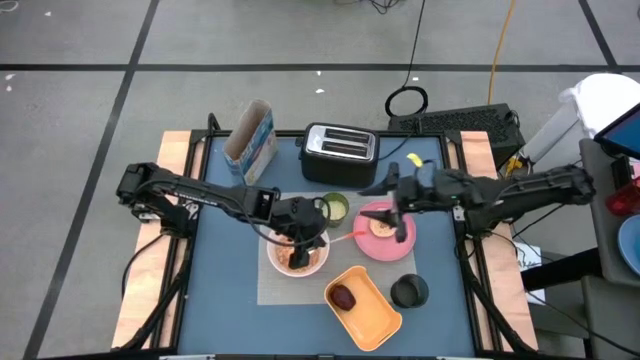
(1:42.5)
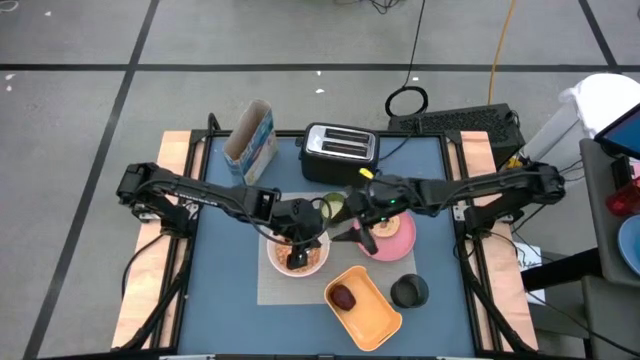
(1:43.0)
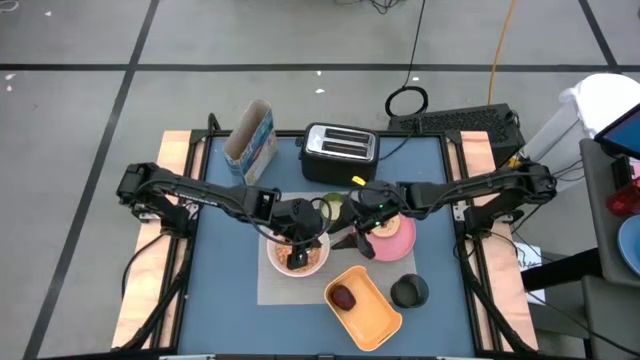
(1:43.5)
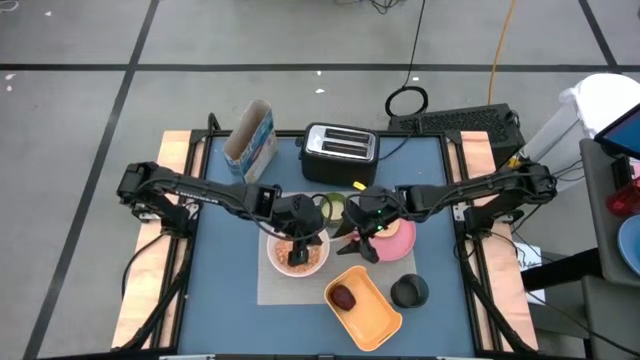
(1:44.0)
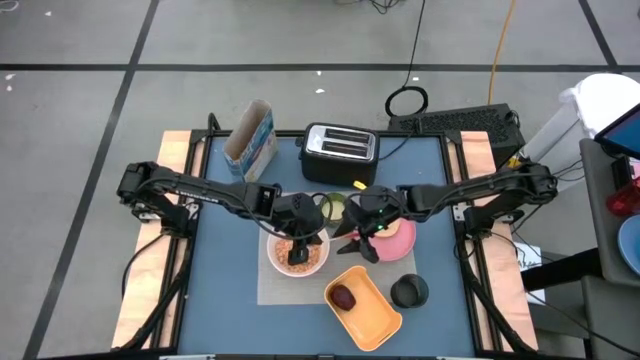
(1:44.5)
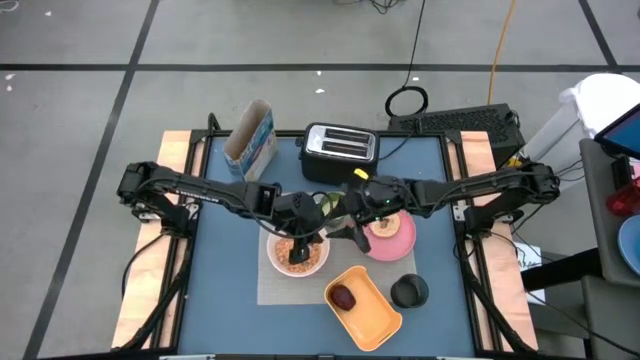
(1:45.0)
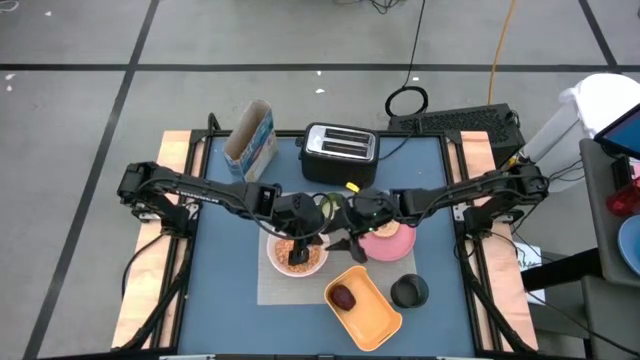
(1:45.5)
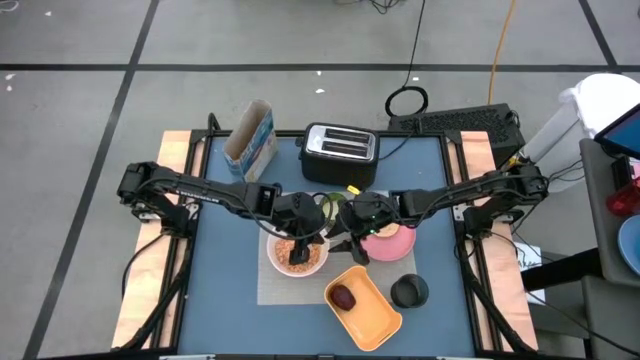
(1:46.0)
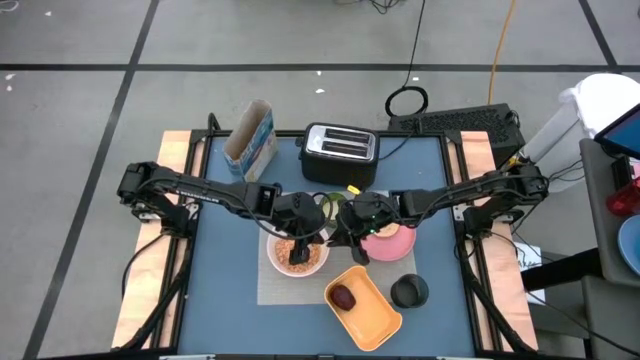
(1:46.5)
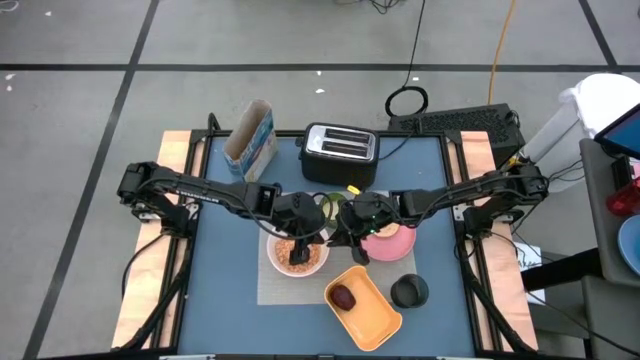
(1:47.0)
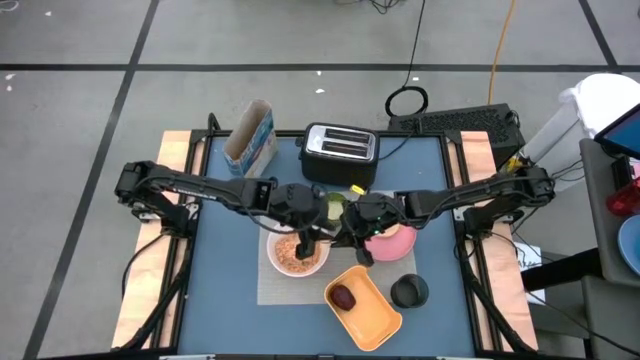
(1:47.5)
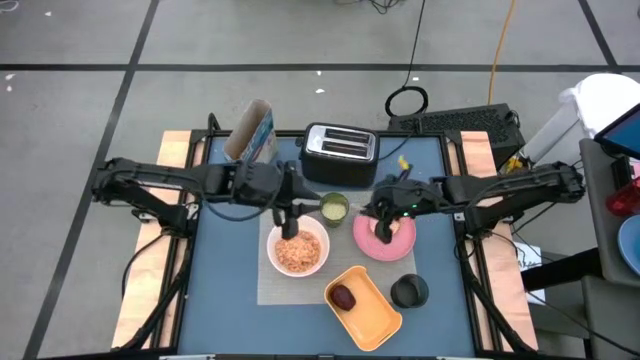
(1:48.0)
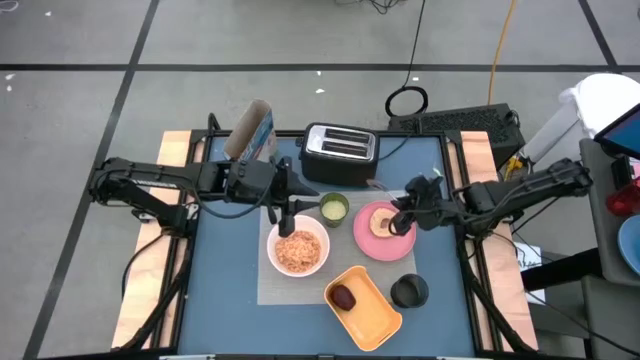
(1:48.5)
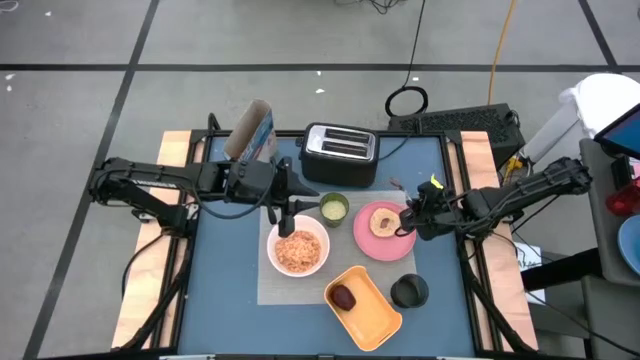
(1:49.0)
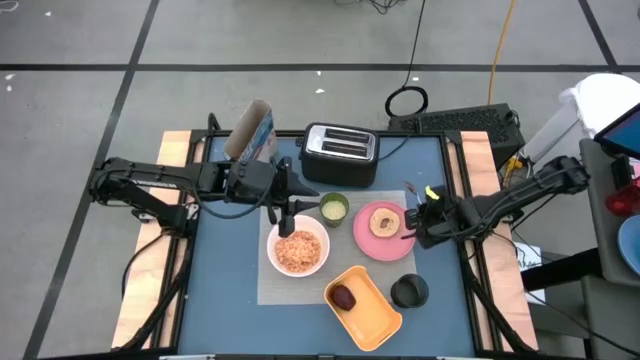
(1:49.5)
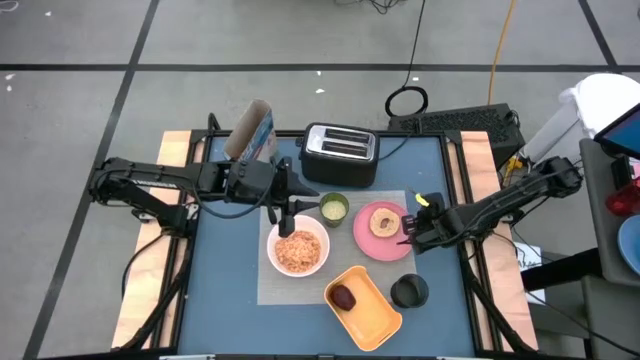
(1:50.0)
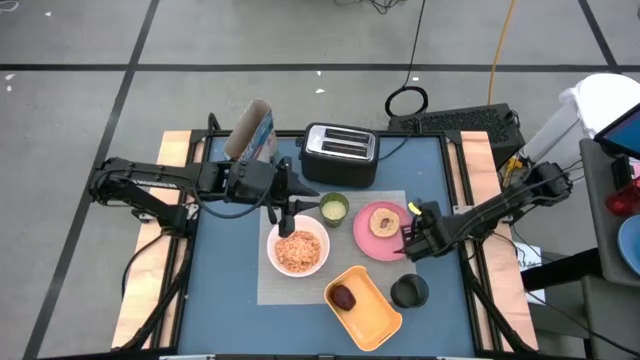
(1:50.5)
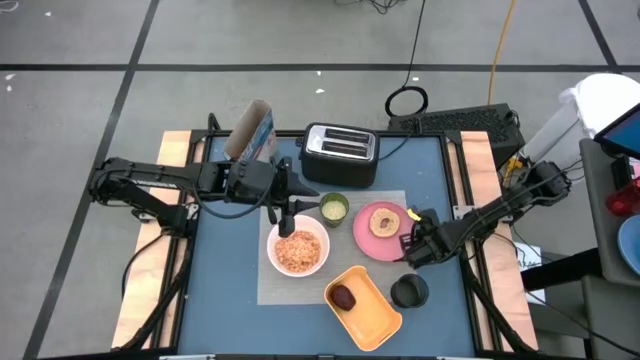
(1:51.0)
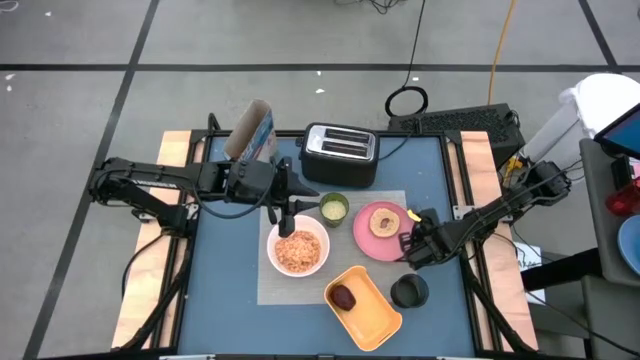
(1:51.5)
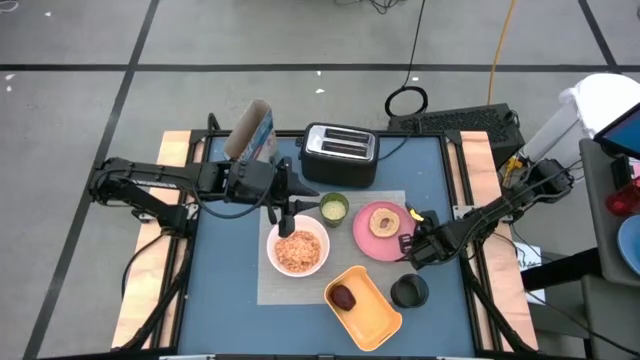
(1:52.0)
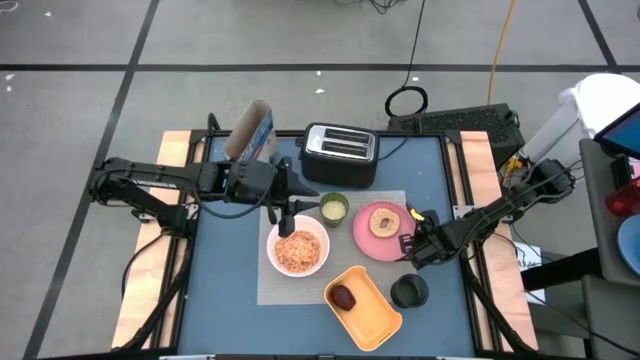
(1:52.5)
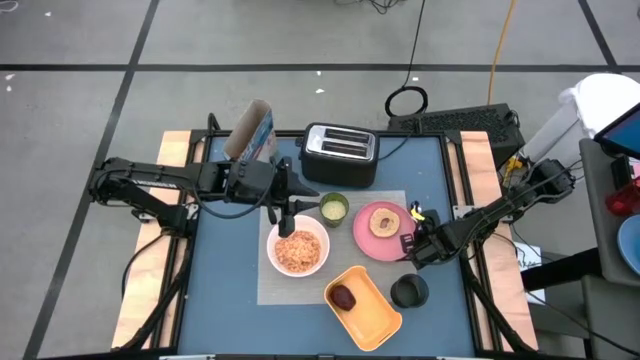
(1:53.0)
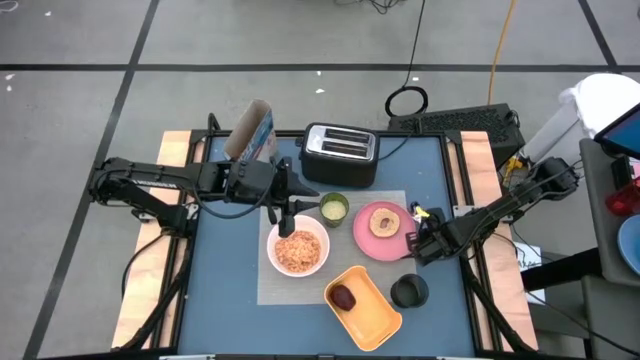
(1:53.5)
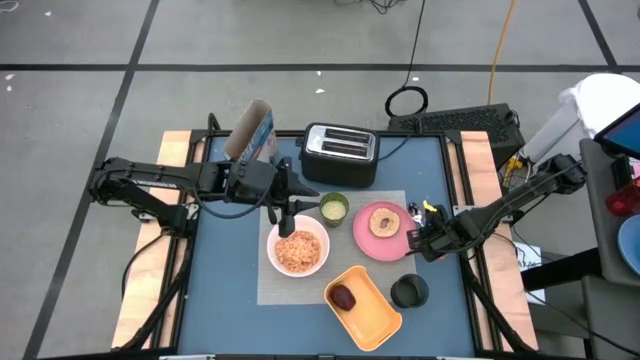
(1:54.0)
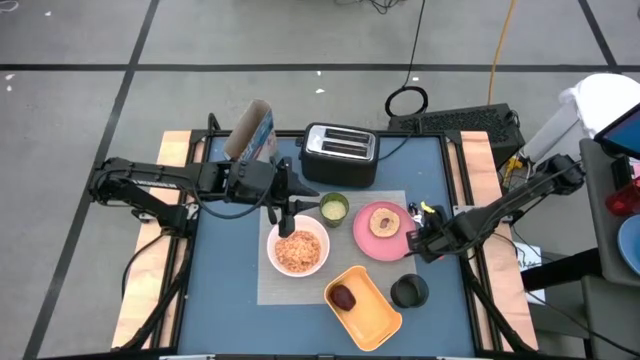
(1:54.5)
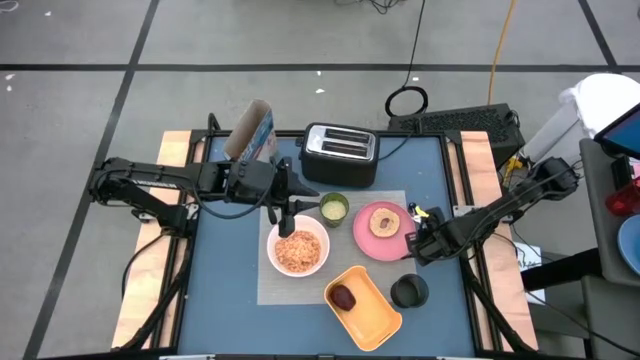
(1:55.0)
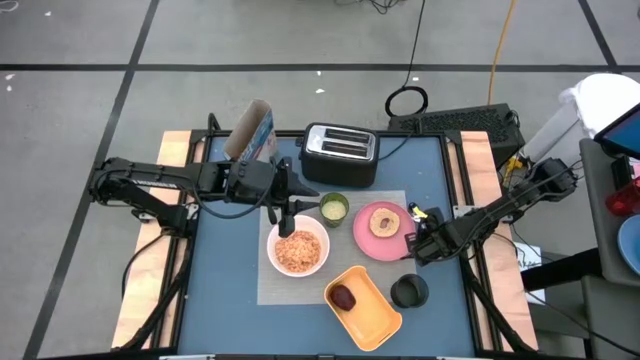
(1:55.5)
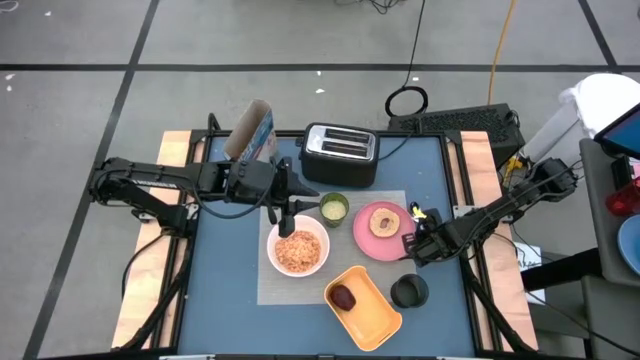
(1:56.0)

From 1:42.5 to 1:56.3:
Task: Arrange a breakfast setting
Put the orange spoon to the right of the pink plate

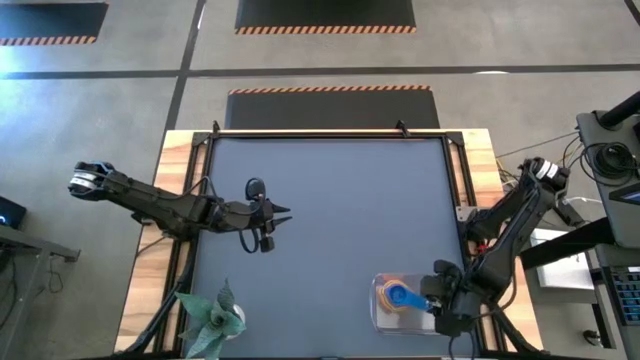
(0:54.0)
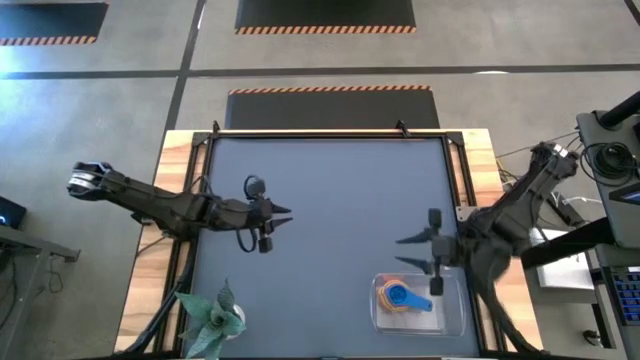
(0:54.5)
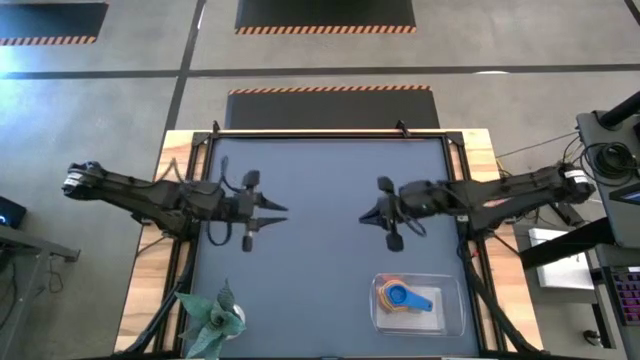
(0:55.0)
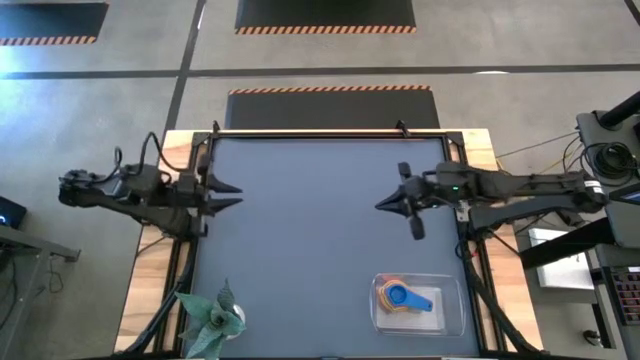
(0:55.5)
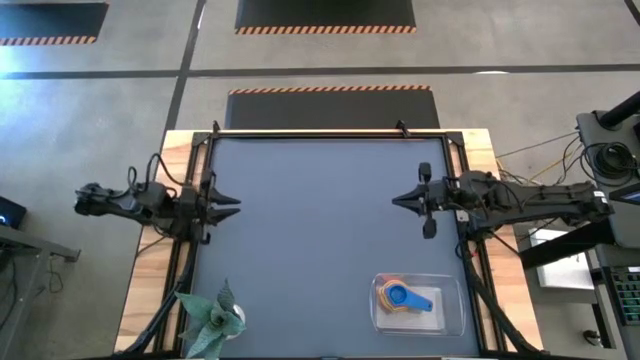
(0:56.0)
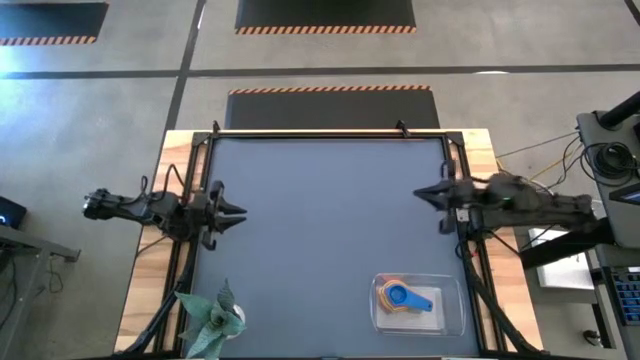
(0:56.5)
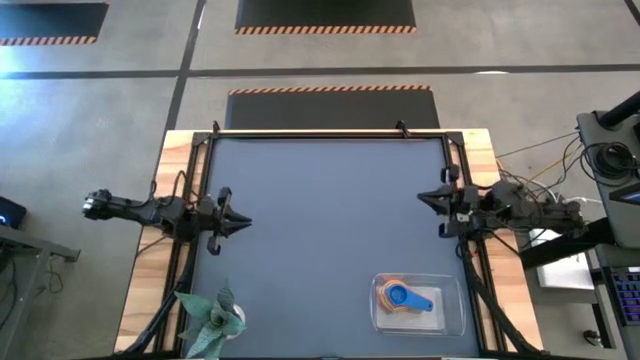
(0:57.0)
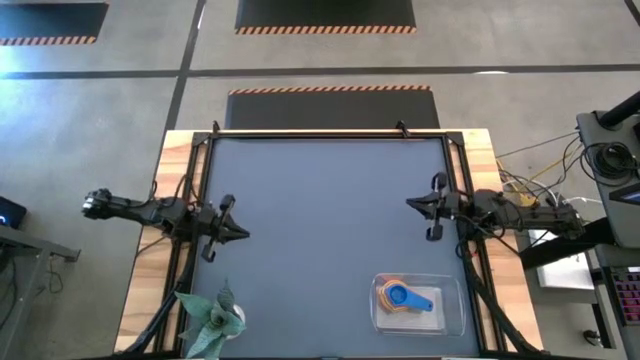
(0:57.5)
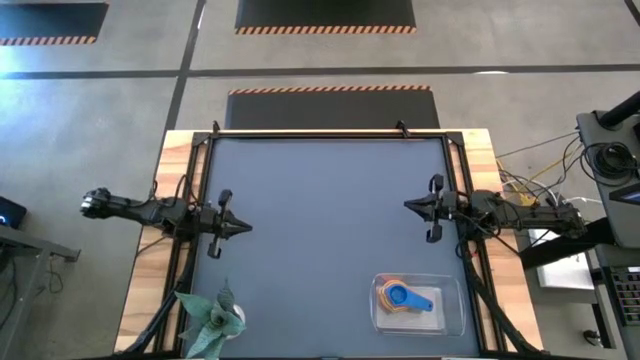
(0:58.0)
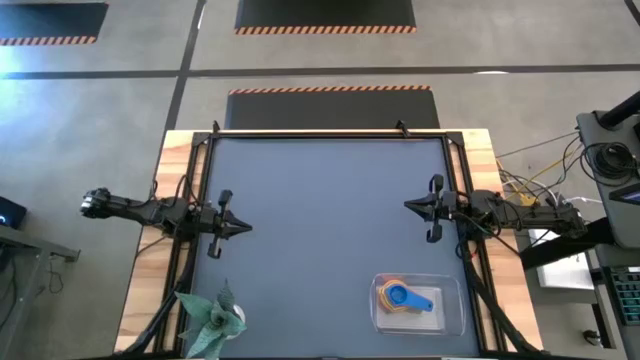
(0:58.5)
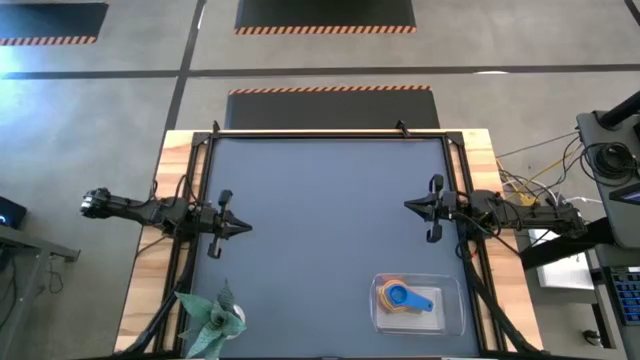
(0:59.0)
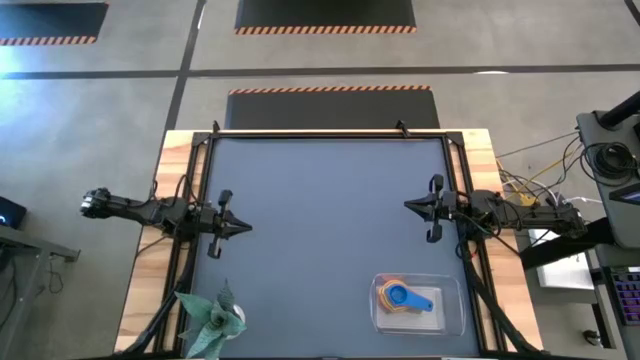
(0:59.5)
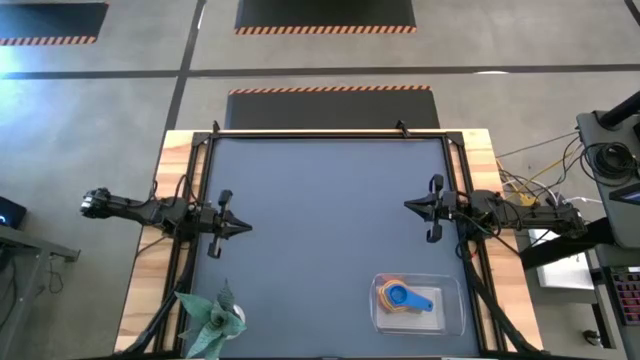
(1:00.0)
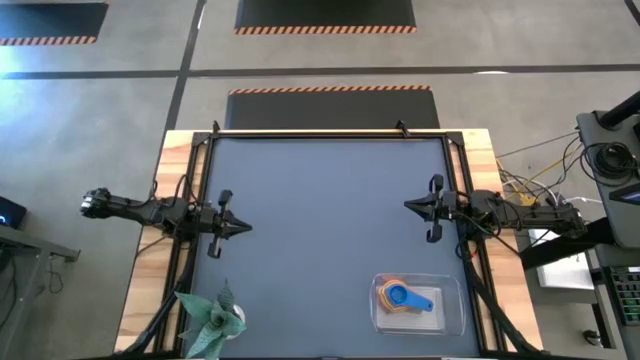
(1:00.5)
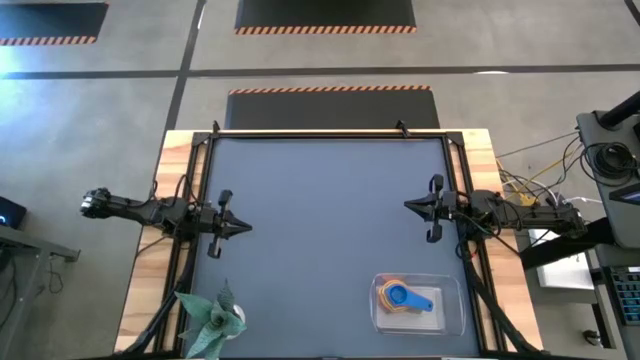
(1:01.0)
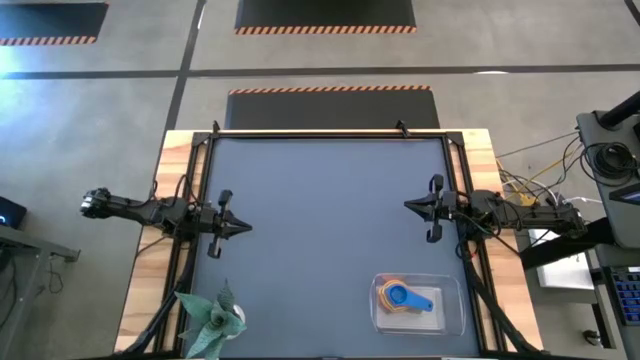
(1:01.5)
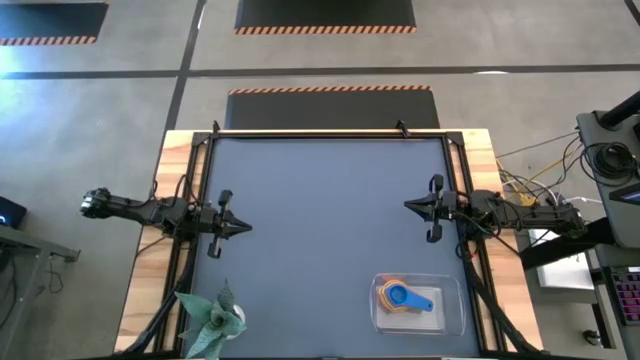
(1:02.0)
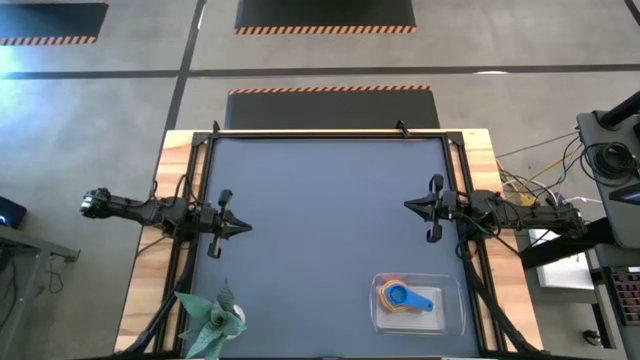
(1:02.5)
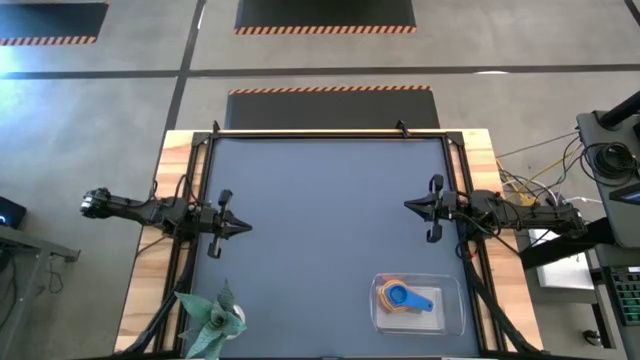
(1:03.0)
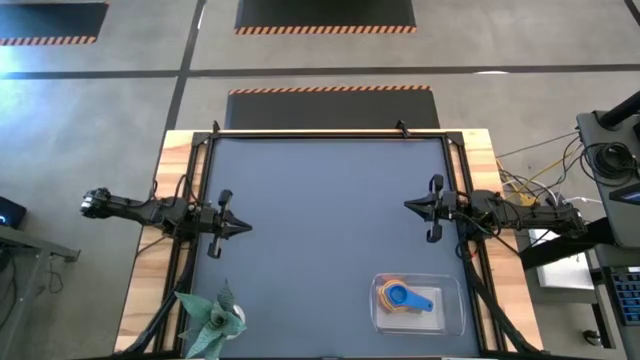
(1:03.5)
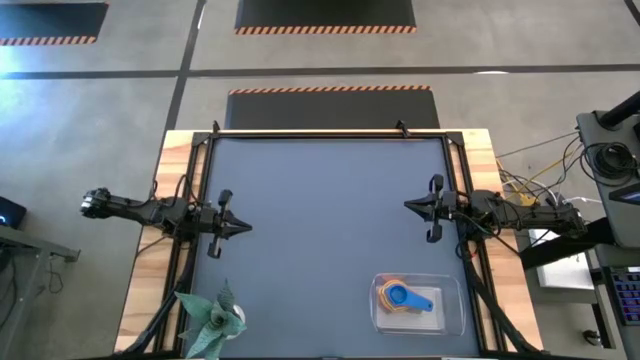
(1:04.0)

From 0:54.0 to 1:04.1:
Task: Nest measuring cups in basket
Return to Home Position
